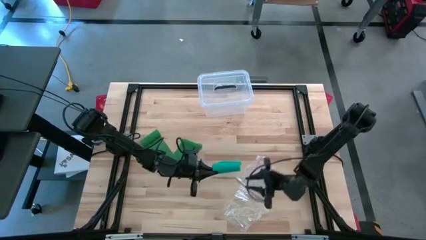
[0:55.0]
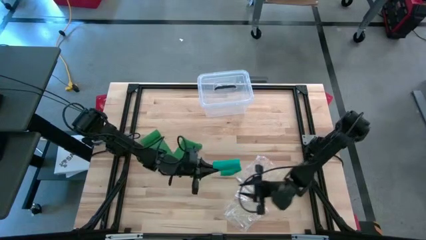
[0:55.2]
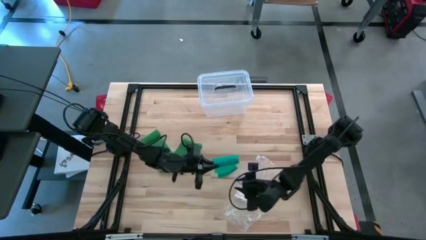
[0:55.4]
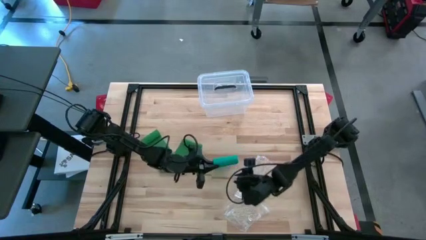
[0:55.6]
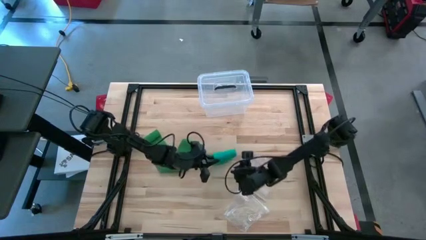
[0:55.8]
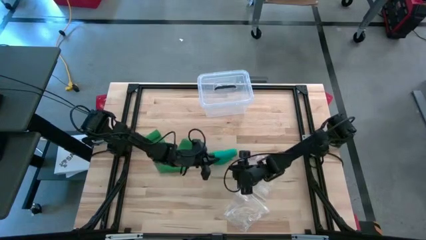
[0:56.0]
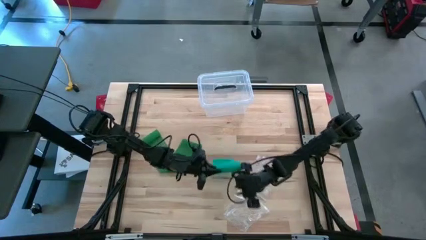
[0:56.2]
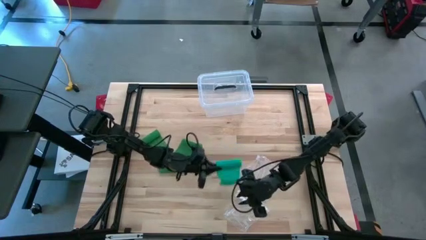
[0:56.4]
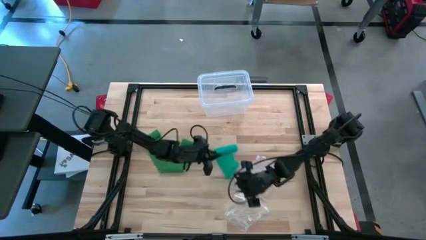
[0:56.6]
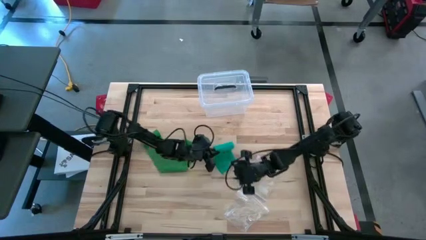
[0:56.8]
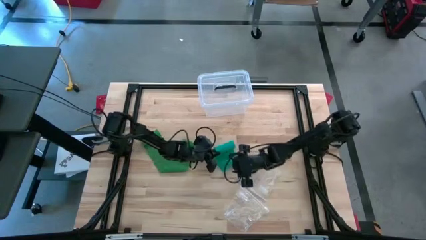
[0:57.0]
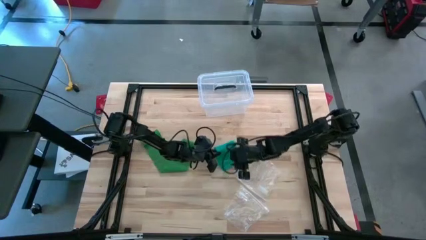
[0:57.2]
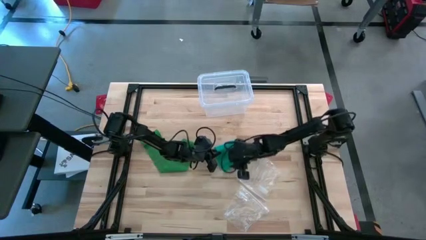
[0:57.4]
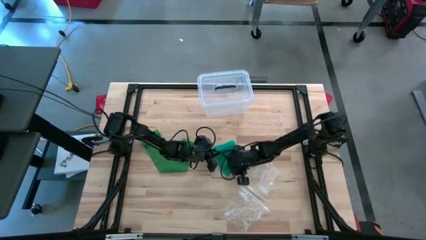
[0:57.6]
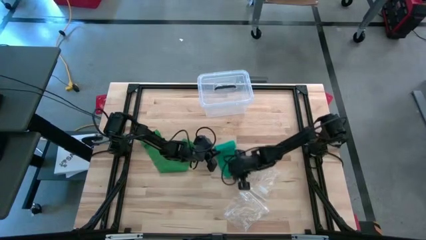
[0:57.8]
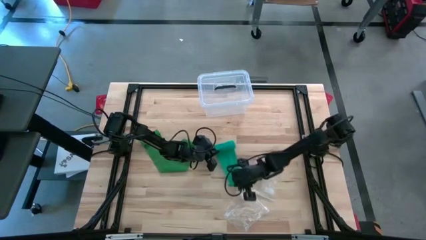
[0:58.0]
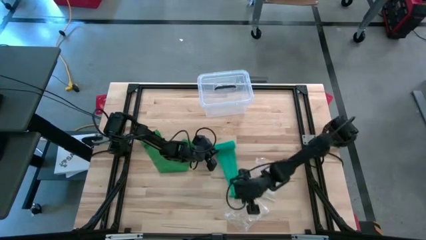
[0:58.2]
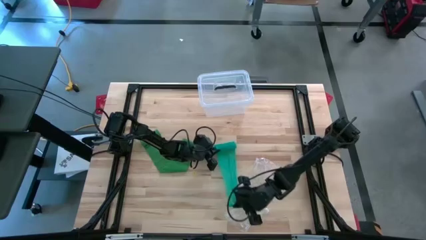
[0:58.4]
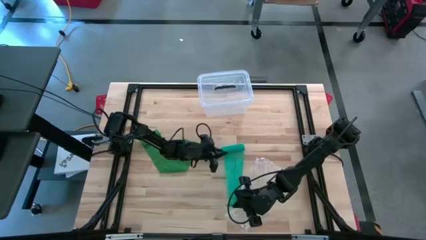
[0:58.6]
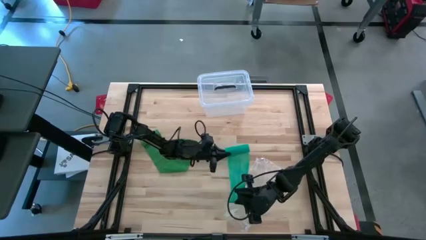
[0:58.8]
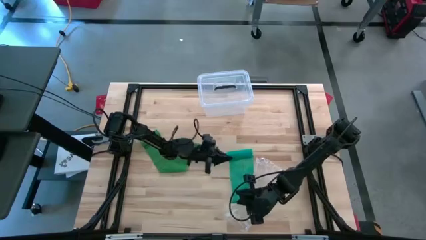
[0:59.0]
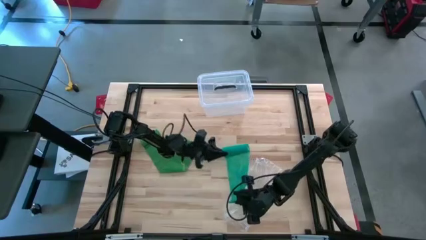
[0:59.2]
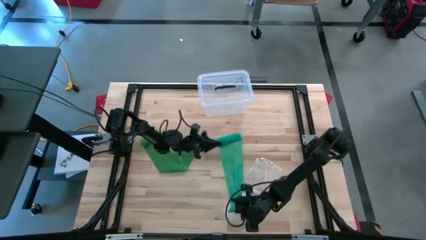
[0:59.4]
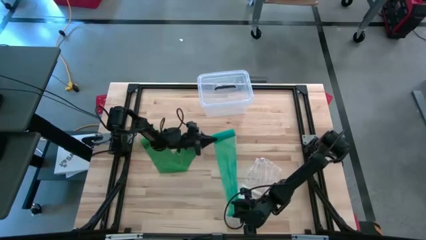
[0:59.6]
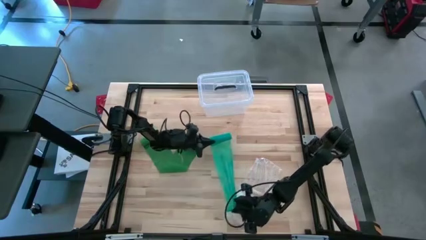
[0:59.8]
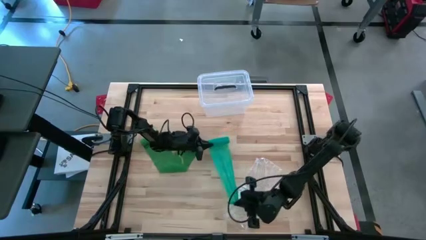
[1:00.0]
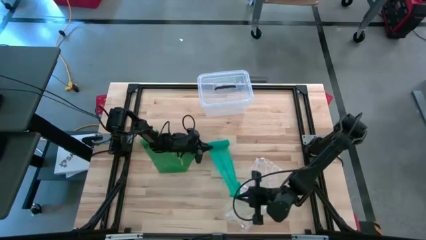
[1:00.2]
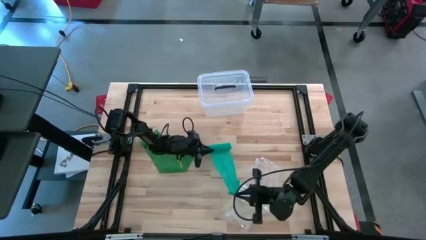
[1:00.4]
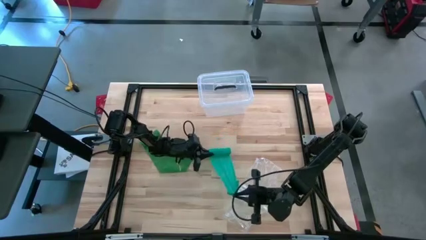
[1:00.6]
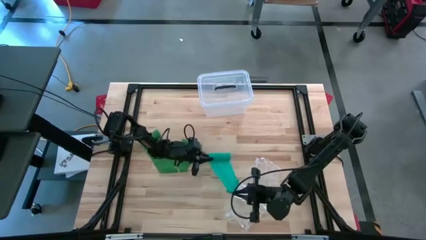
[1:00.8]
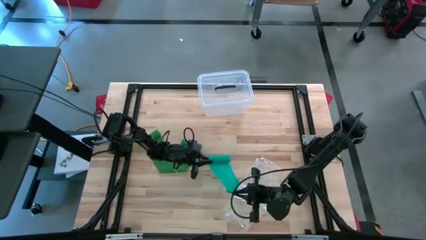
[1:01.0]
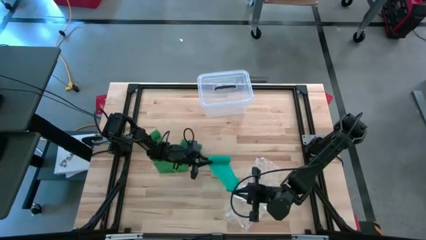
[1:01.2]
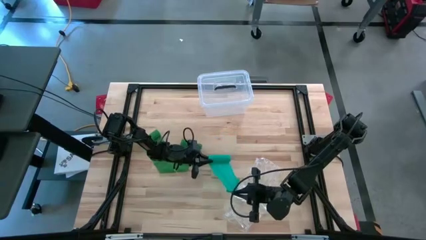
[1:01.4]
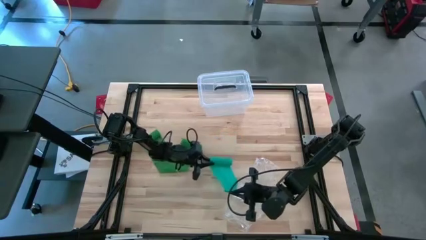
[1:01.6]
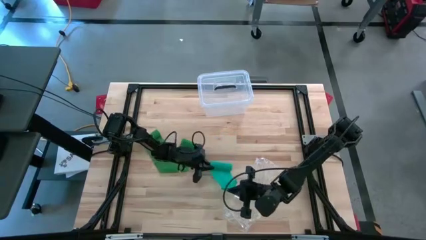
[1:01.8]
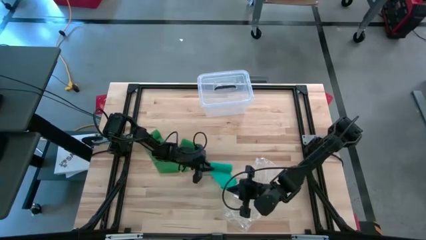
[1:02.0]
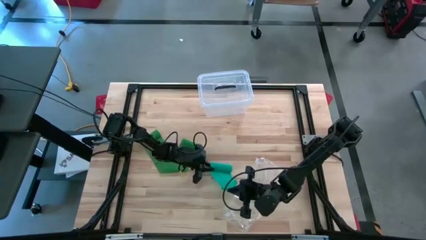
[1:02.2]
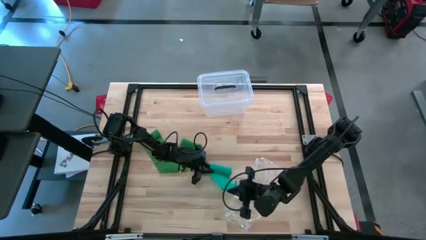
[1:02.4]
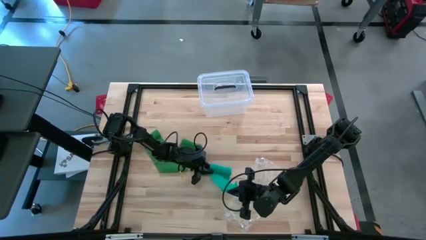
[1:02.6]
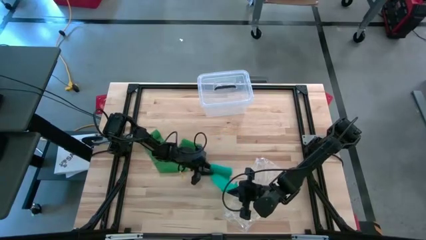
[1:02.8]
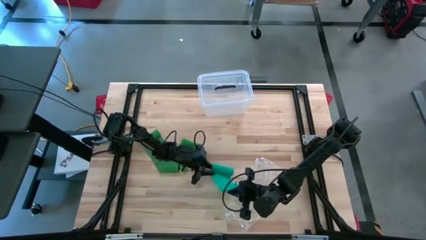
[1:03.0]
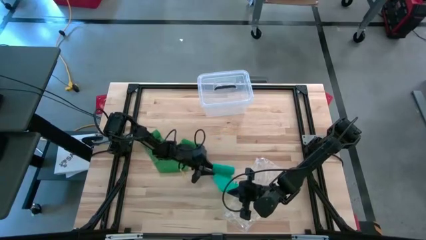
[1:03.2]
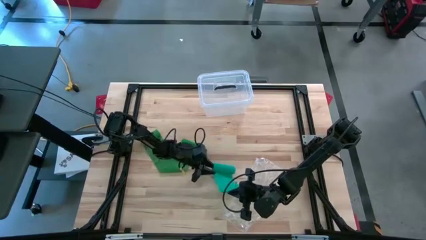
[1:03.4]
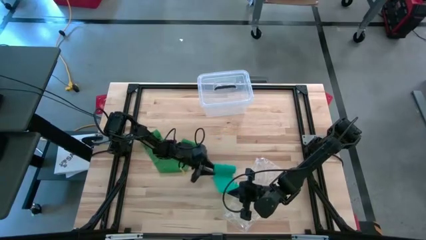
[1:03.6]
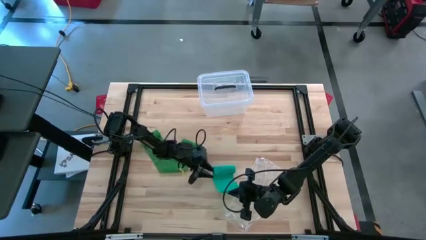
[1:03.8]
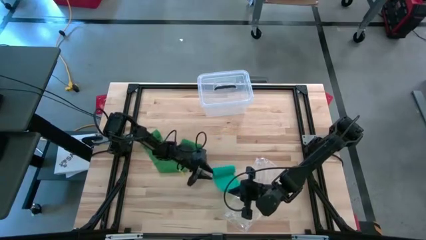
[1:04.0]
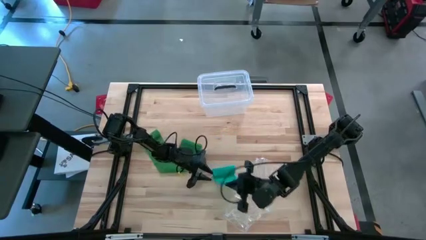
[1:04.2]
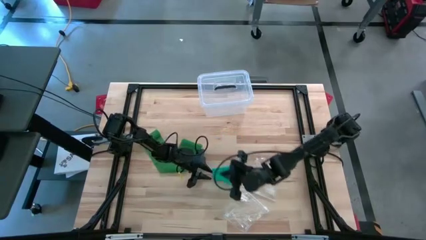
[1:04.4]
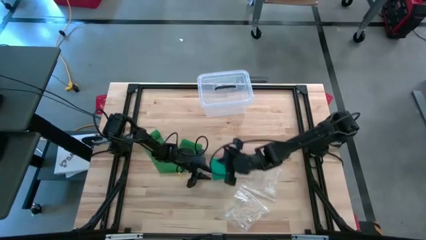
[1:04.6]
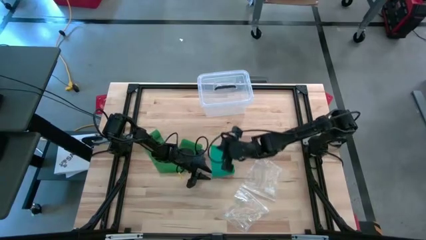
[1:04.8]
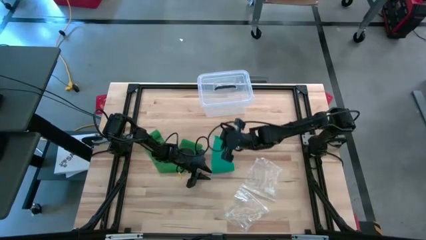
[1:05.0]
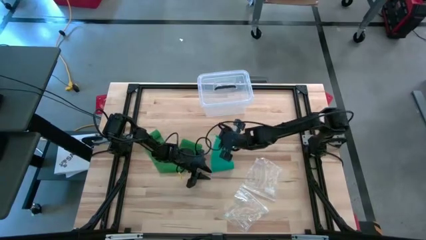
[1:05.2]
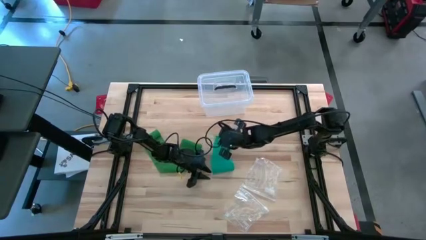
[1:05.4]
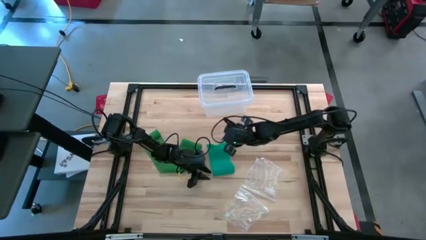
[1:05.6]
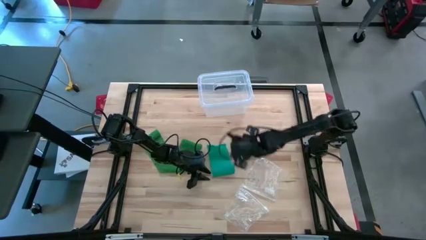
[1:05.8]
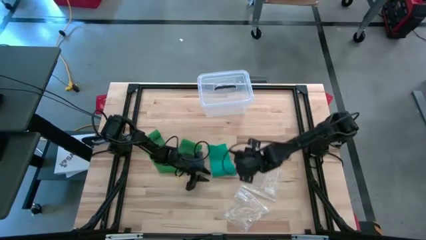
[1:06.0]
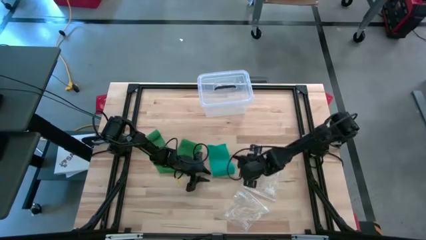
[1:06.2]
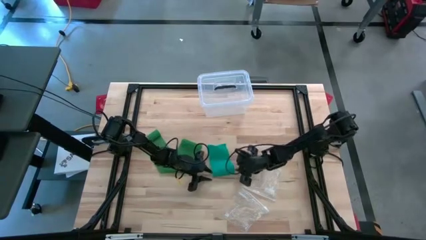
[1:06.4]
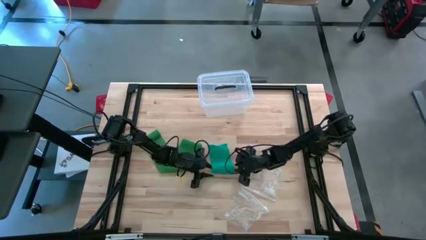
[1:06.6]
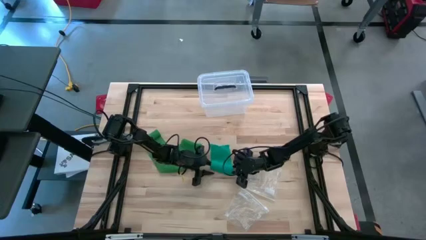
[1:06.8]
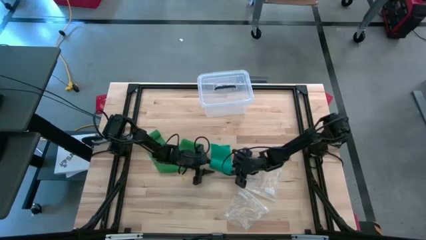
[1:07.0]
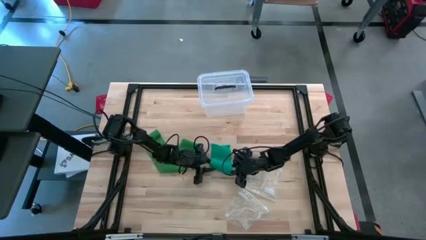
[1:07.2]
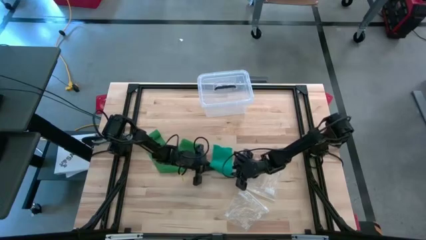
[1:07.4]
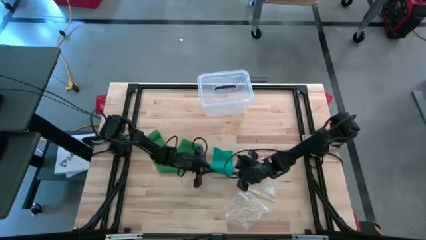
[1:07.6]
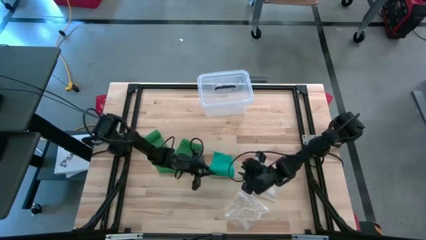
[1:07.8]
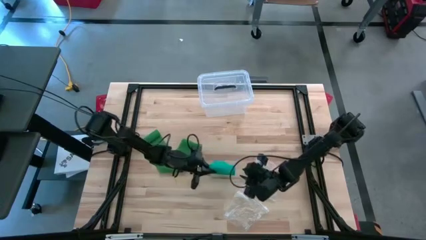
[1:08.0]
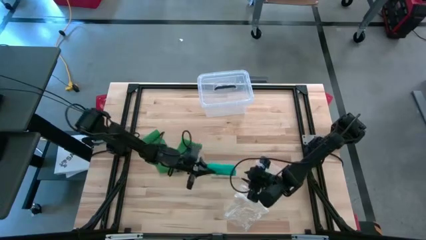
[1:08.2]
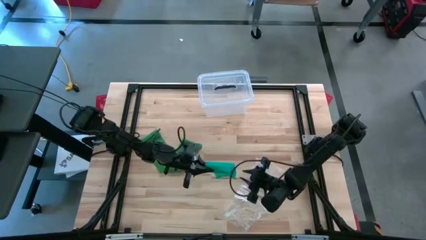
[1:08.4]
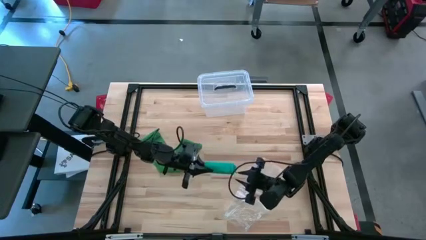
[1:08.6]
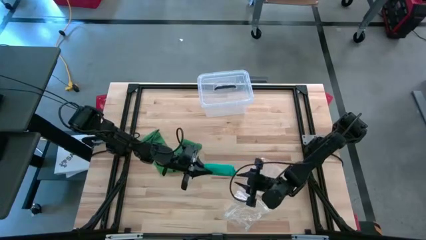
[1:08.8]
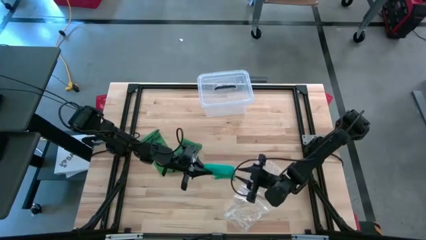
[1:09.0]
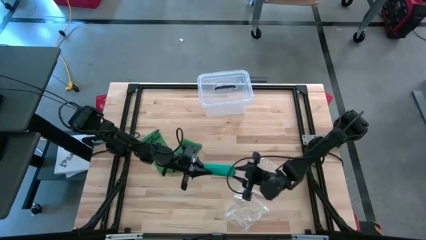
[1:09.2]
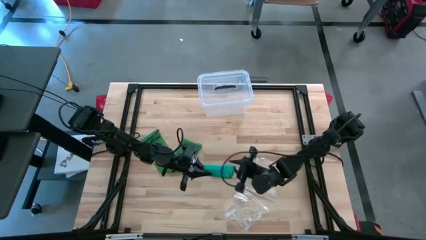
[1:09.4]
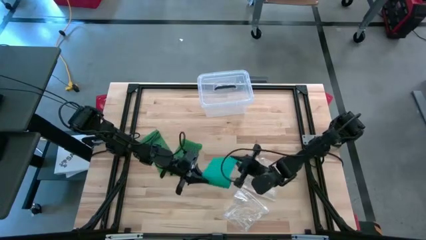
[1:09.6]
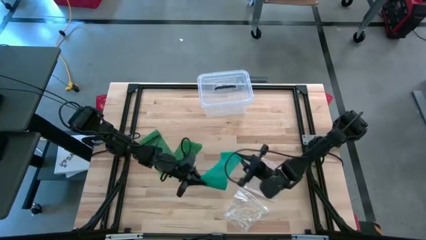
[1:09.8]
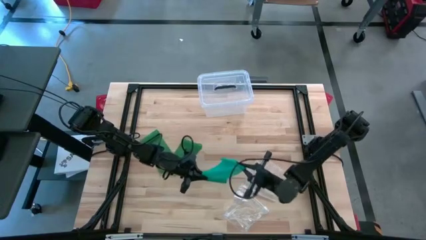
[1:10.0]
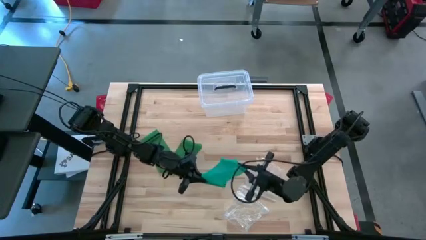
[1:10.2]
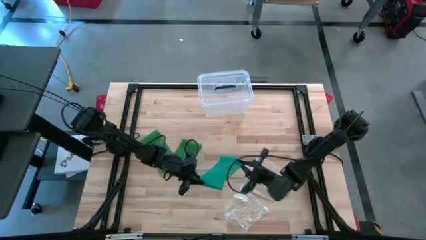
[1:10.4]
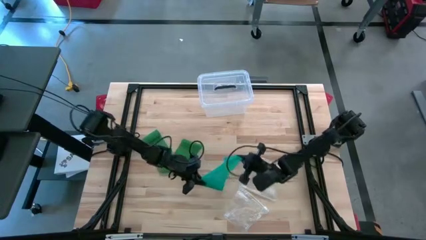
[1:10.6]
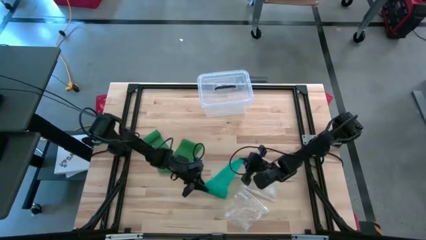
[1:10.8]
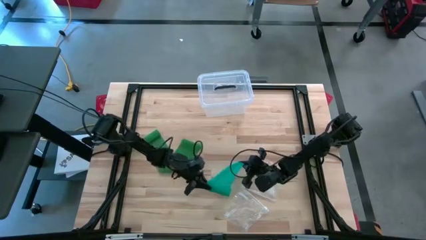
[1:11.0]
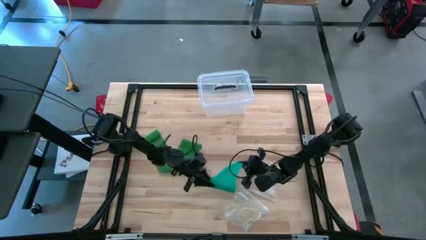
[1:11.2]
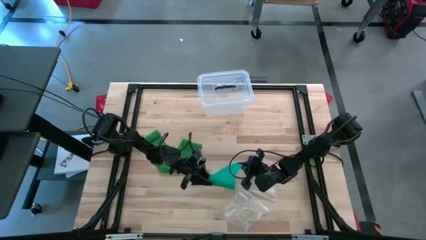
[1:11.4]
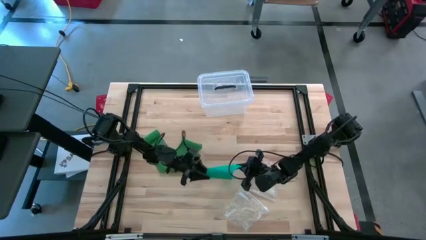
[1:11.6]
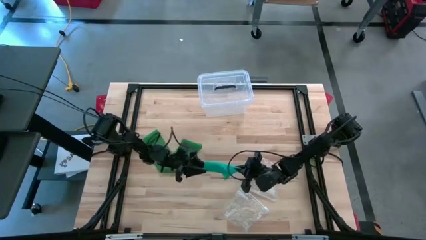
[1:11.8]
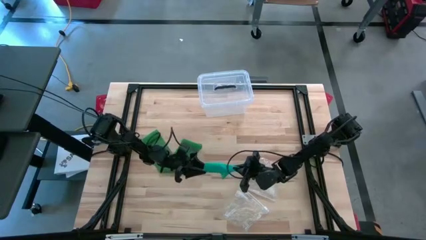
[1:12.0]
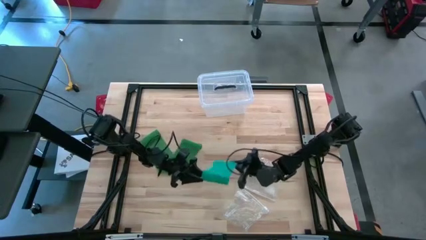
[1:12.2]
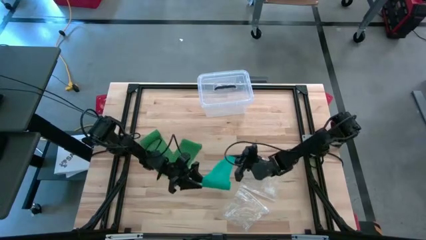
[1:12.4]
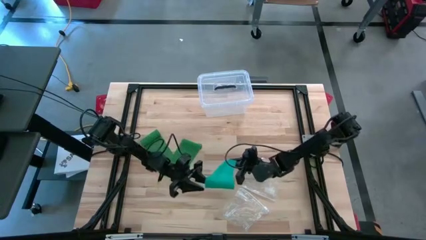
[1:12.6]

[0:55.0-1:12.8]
Task: Roll bandage
Roll the blue bandage
